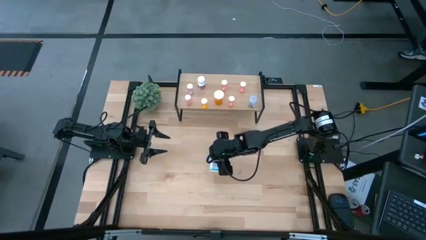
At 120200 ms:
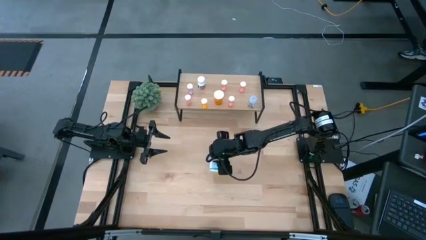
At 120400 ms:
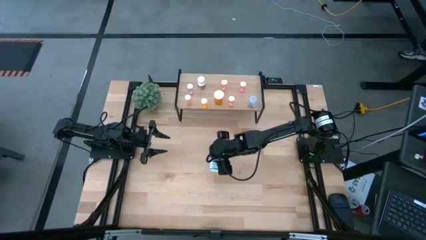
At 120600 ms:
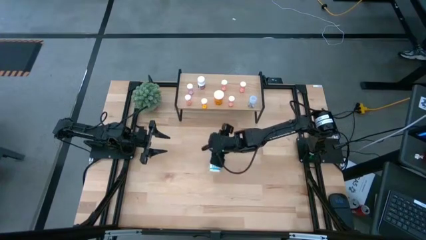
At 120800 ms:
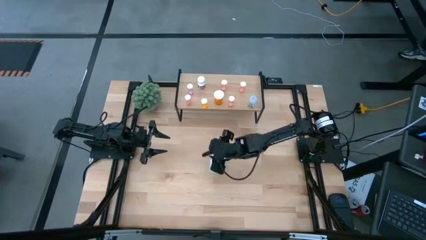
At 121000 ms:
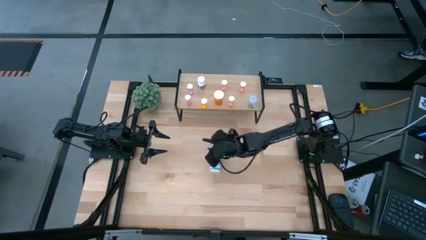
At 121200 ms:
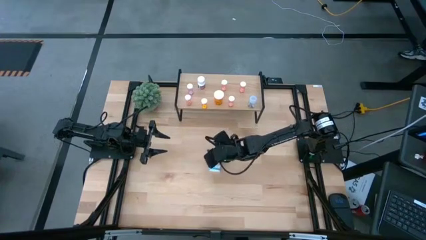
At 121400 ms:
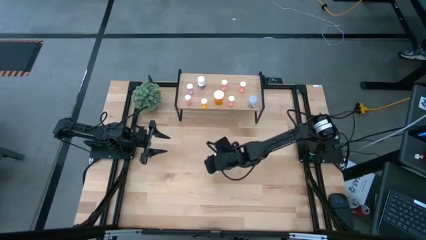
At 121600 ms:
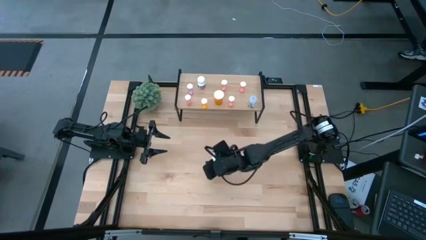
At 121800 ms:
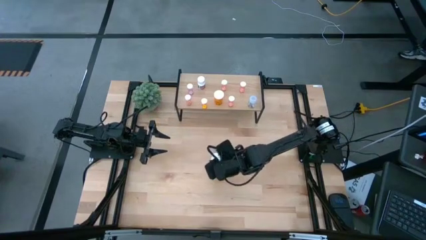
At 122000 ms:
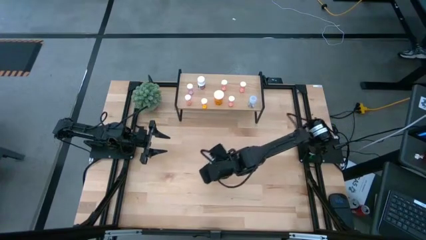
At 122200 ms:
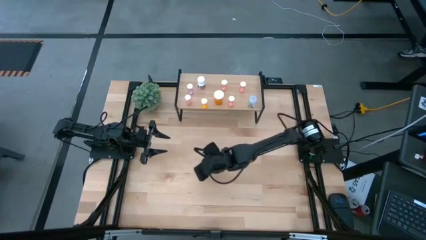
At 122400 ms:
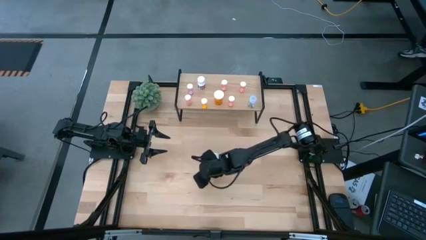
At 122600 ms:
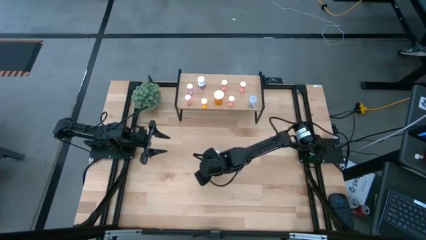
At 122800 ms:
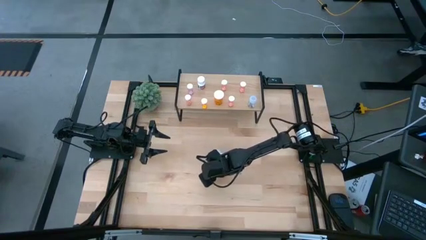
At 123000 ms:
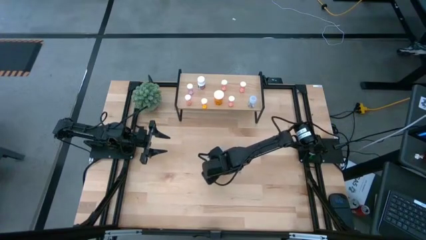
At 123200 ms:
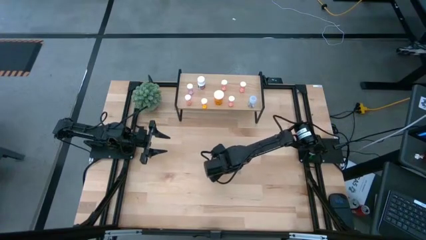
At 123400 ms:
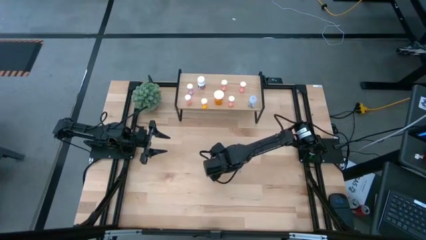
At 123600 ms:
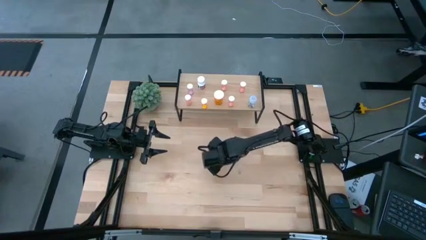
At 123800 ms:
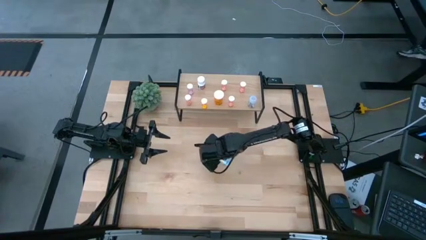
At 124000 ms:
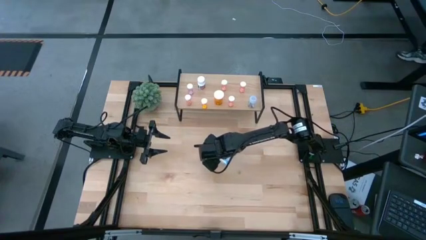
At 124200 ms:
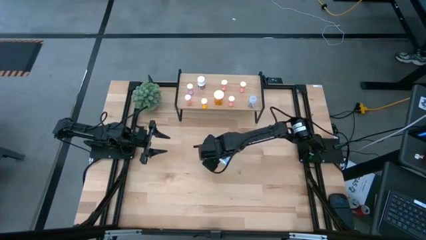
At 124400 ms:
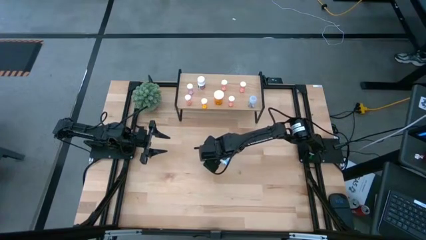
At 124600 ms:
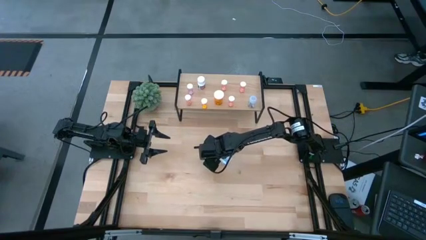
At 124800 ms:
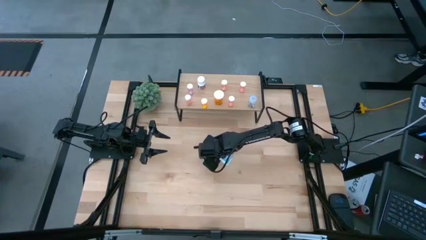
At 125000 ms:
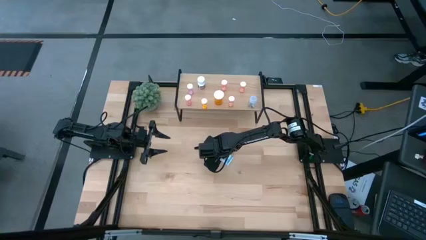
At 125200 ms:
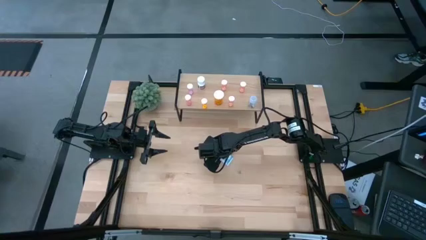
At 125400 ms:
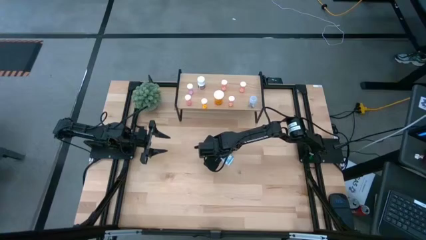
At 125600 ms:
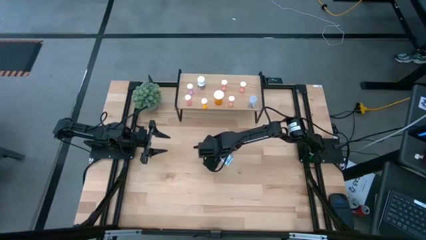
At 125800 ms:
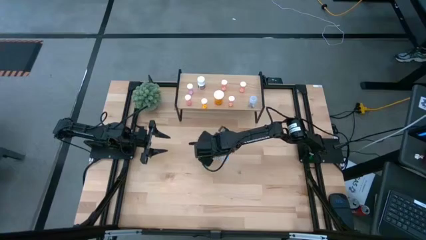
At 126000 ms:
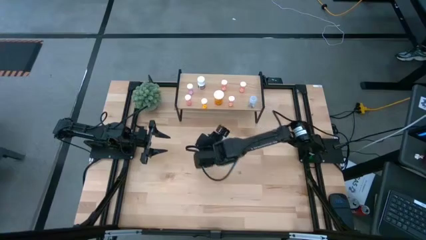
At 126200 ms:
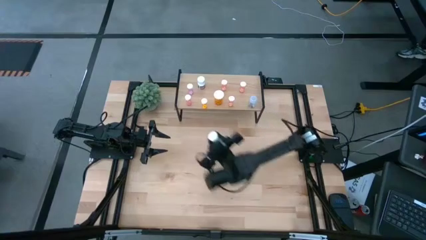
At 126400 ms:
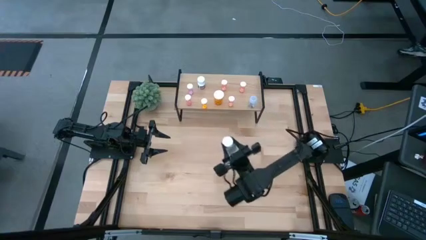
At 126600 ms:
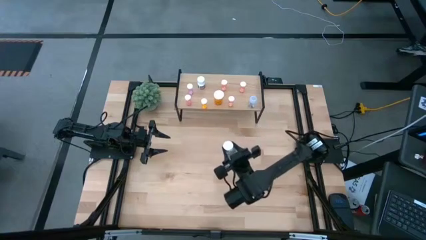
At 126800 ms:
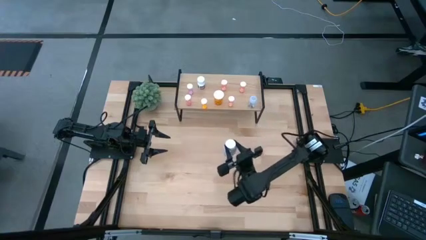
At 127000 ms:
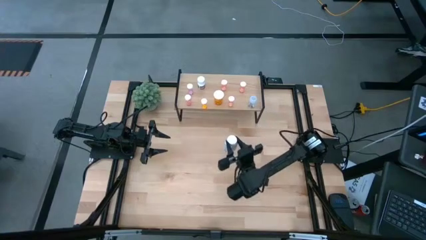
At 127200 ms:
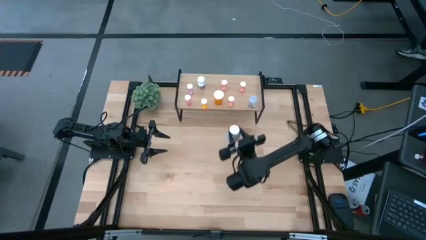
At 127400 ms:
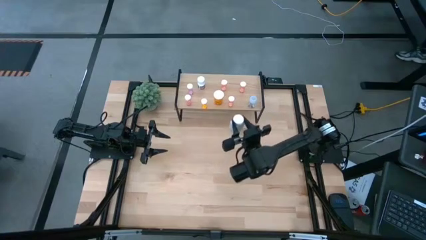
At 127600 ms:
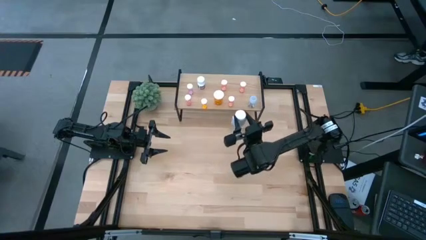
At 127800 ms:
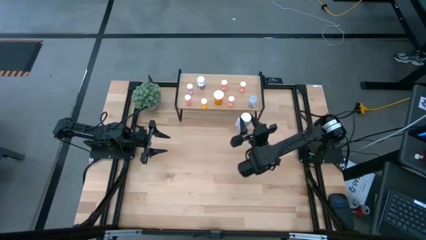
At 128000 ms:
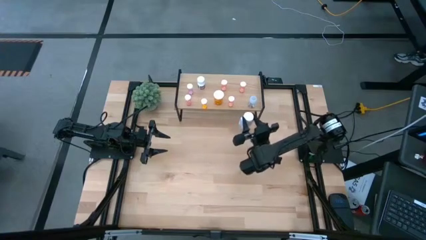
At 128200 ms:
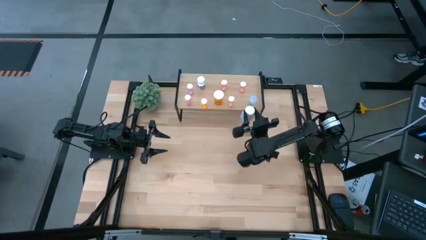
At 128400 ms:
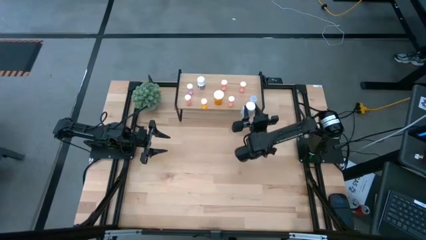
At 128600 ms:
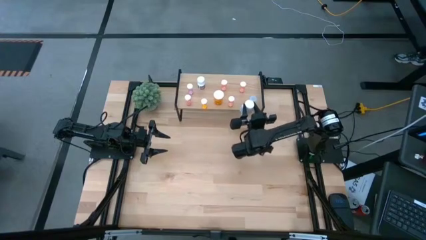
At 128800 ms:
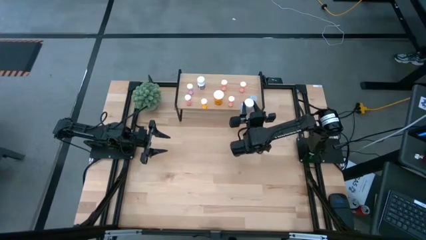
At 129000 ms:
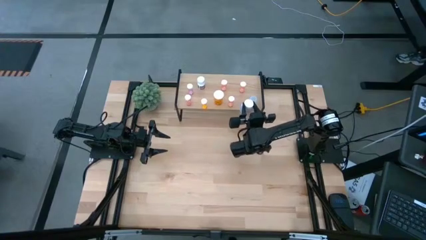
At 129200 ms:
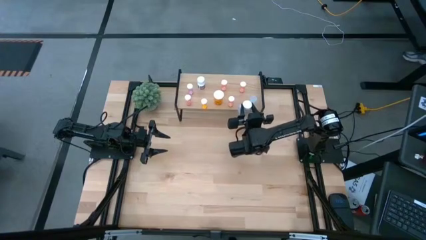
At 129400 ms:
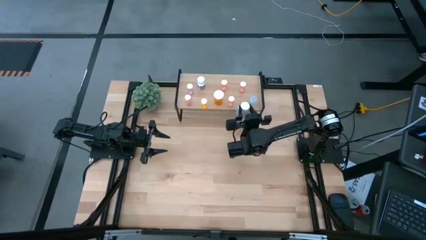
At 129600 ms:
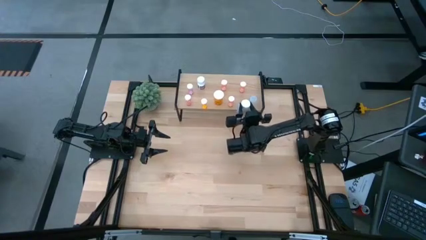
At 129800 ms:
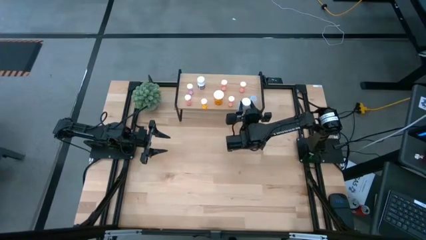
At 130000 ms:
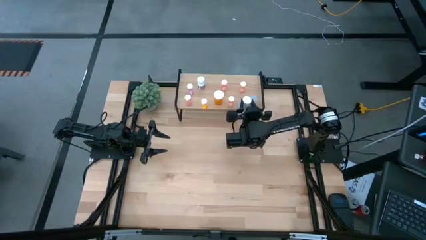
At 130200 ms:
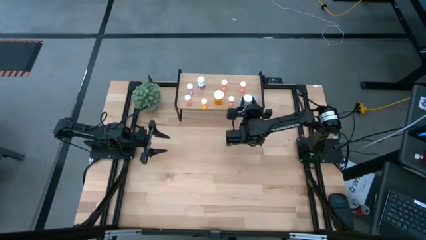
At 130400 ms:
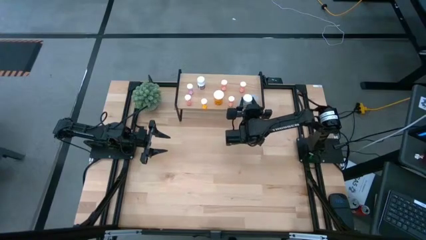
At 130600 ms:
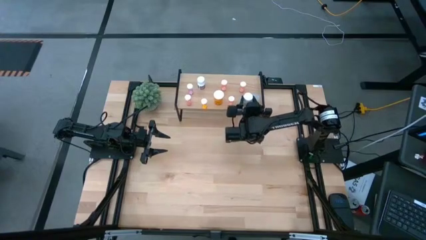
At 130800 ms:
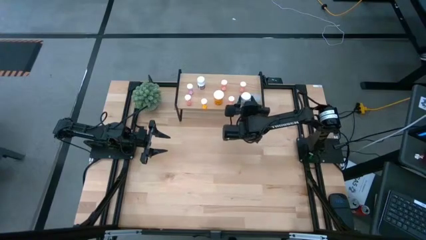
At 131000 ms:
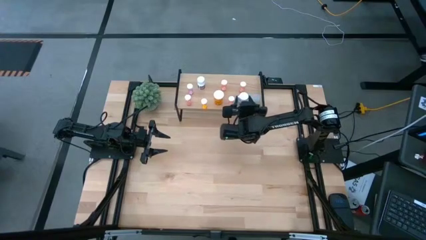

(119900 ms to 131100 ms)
Task: Pick and place medicine bottles onto shelf by color
Put the white medicine bottle on the shelf

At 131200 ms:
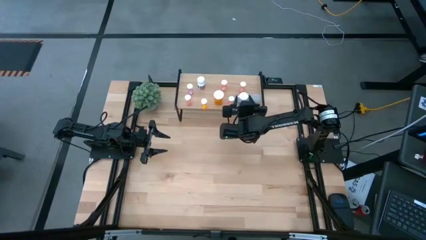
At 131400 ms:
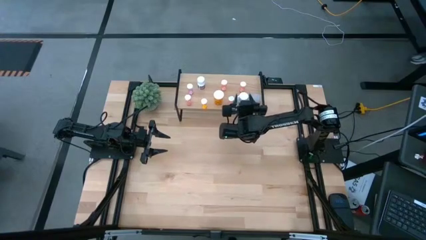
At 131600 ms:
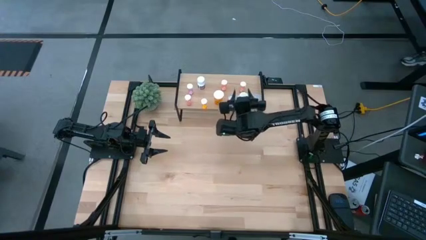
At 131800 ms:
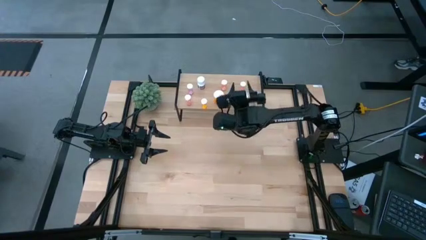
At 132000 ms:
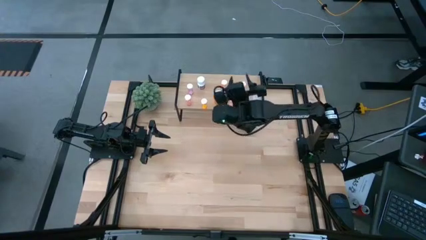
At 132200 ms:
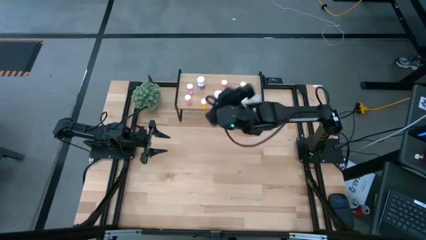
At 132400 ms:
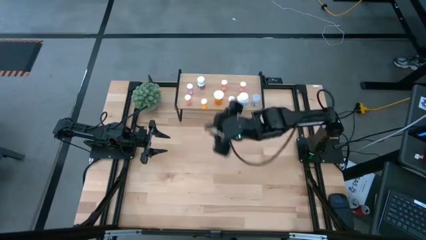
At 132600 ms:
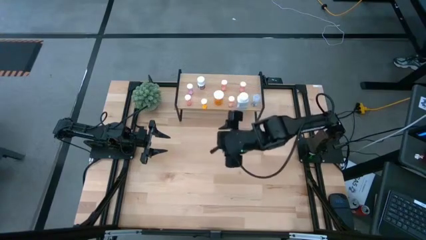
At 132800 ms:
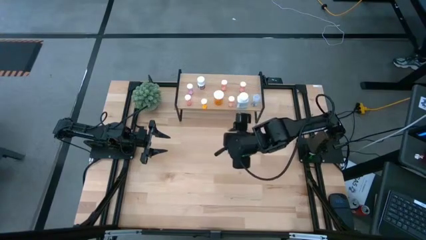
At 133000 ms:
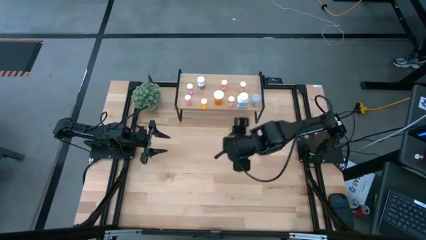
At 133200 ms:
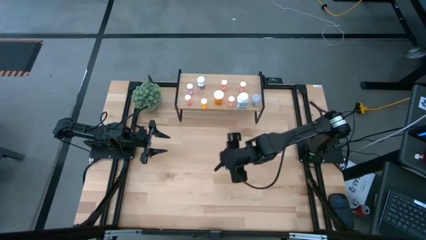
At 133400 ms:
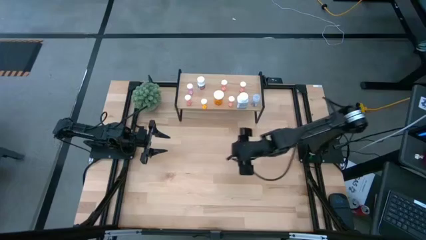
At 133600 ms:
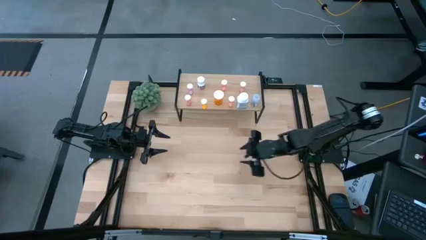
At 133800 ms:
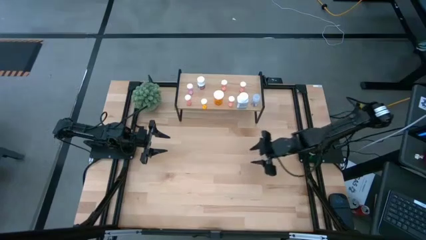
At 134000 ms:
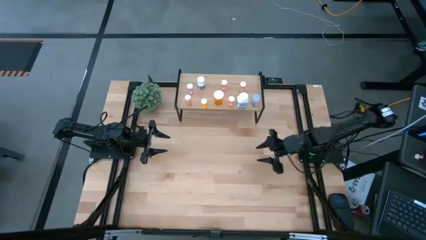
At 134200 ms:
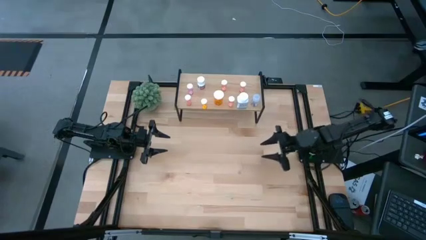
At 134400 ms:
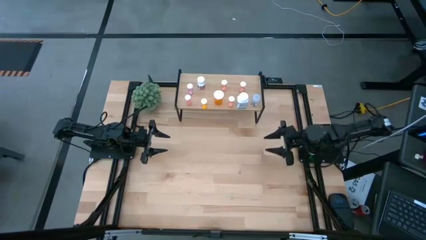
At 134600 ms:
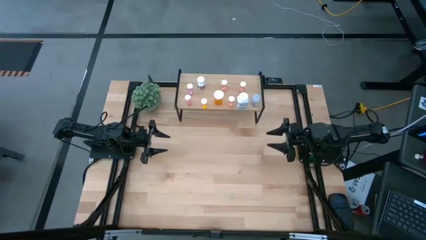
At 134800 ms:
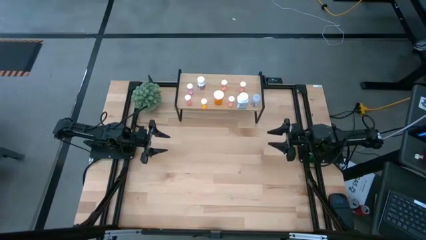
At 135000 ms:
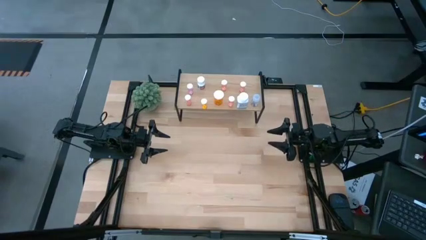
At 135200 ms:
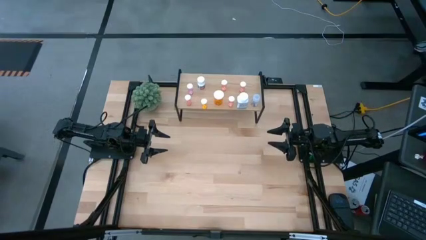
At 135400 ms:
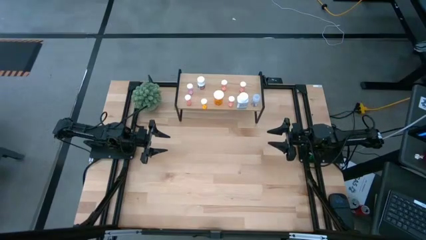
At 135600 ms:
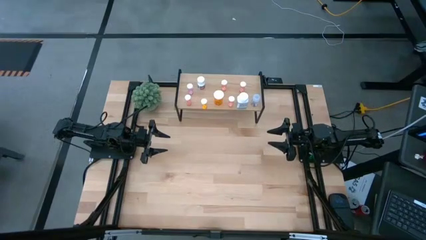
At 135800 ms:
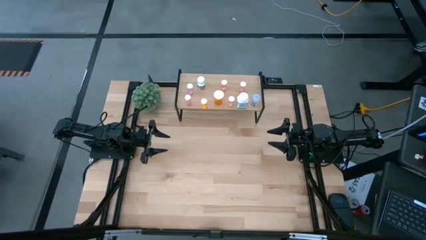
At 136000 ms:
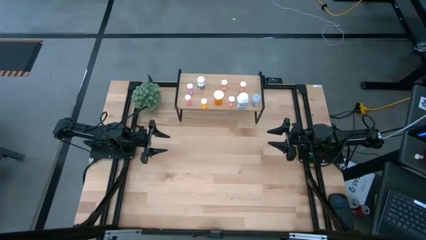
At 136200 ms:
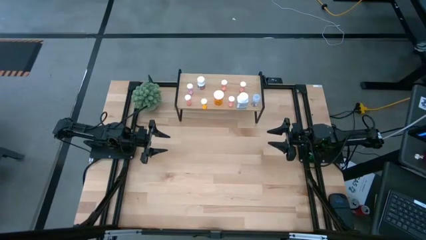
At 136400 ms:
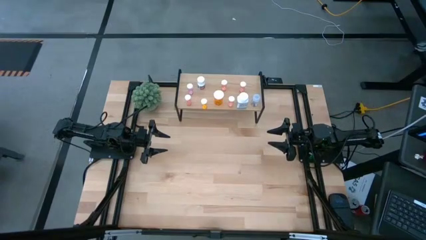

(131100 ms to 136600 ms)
Return to Home Position

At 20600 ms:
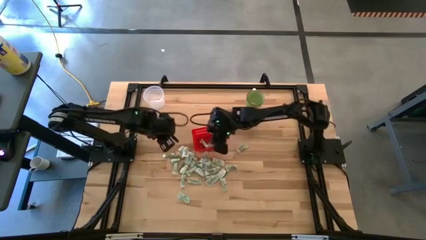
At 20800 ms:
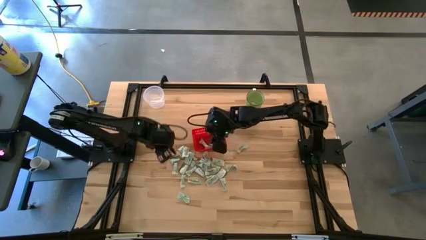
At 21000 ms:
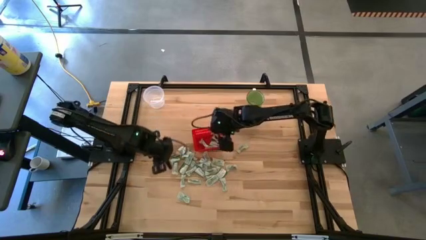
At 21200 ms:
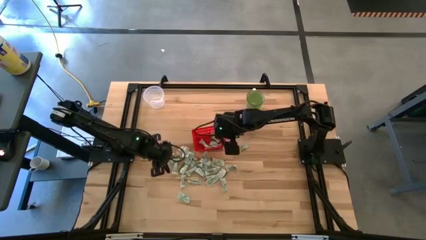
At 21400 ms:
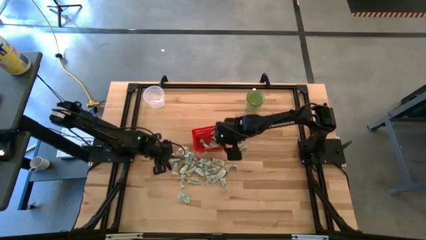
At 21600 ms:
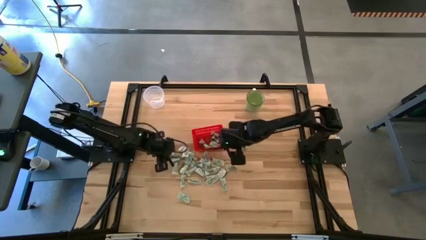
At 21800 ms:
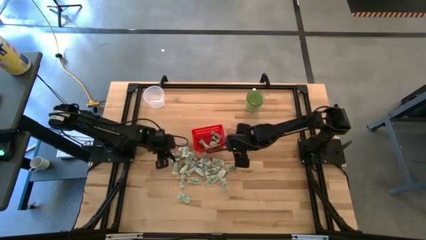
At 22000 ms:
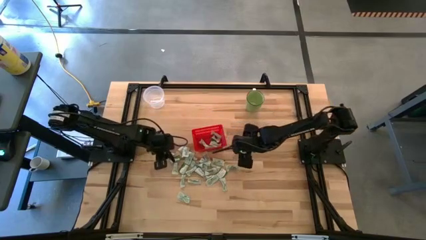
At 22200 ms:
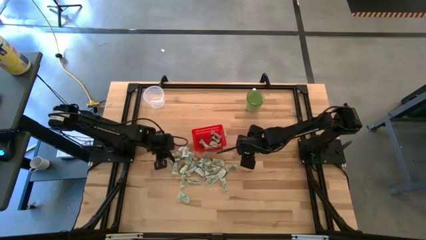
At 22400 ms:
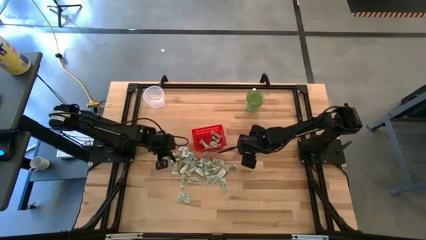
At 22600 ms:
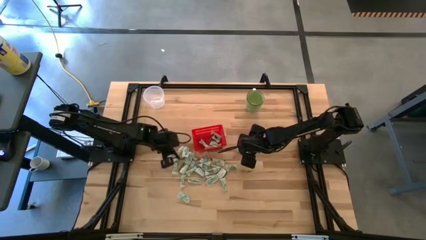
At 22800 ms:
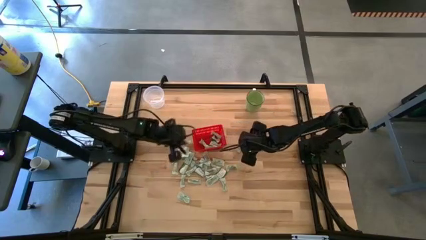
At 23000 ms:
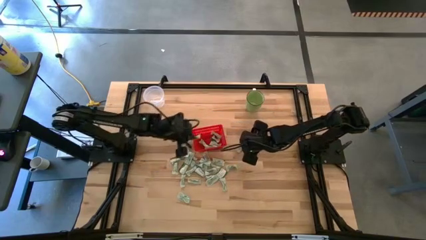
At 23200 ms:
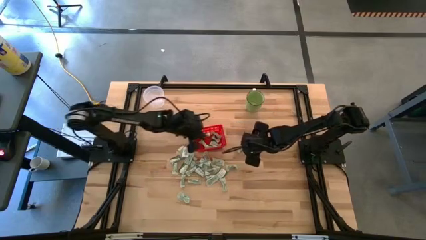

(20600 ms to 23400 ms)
Task: Pick and place Stevia / Truvia into bins
Put the stevia packet into the red basket
